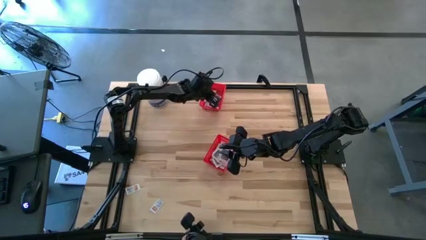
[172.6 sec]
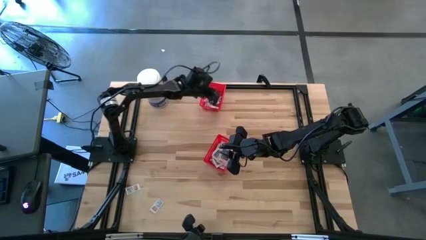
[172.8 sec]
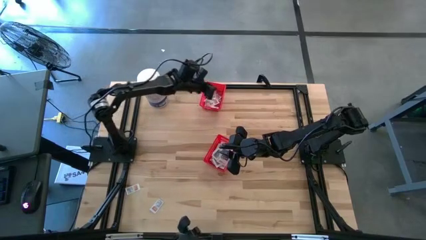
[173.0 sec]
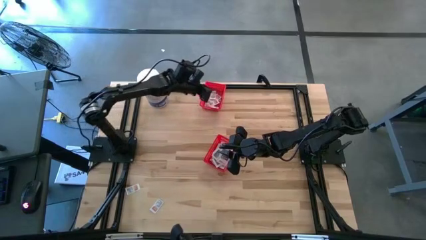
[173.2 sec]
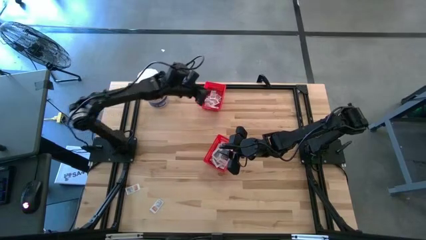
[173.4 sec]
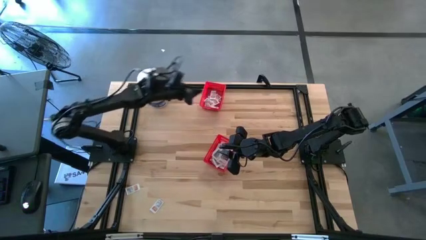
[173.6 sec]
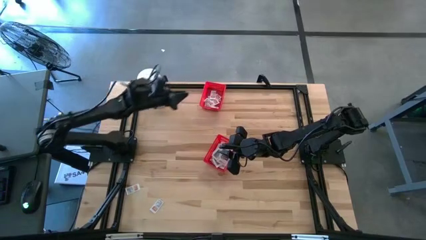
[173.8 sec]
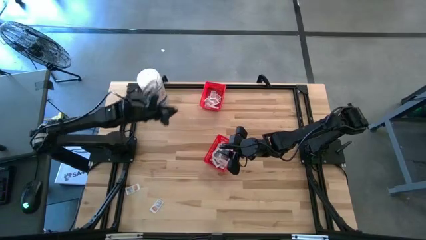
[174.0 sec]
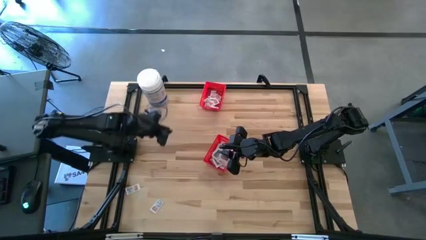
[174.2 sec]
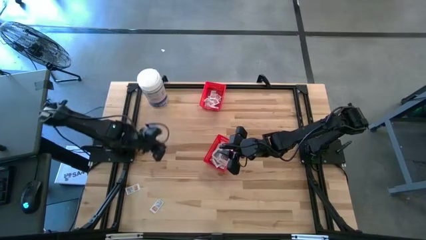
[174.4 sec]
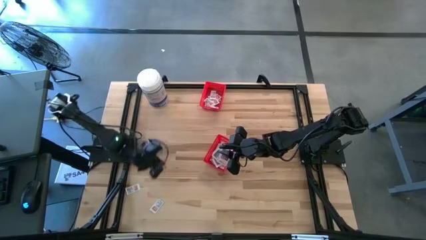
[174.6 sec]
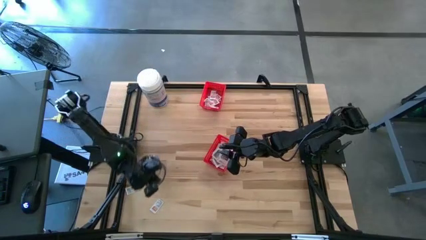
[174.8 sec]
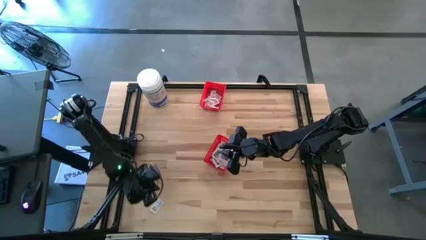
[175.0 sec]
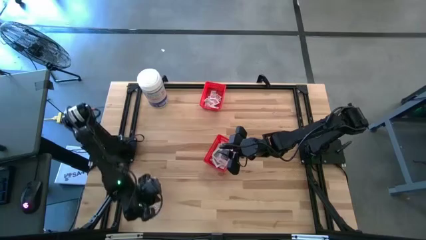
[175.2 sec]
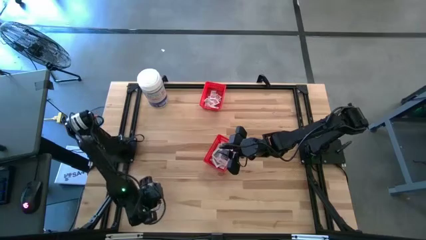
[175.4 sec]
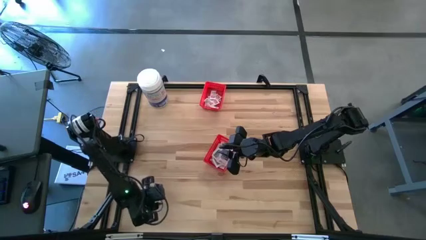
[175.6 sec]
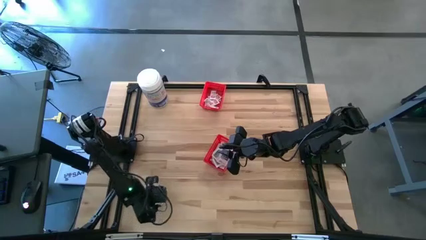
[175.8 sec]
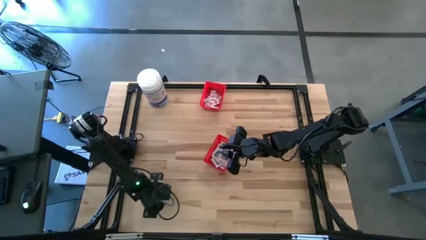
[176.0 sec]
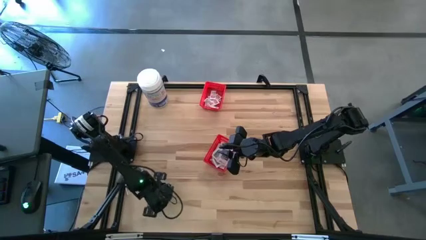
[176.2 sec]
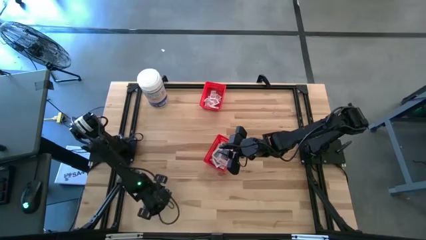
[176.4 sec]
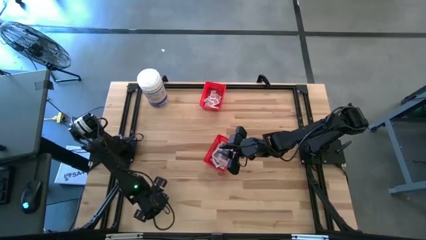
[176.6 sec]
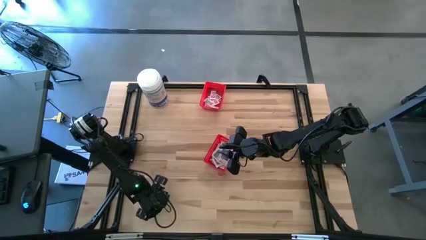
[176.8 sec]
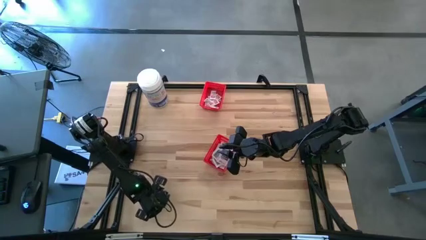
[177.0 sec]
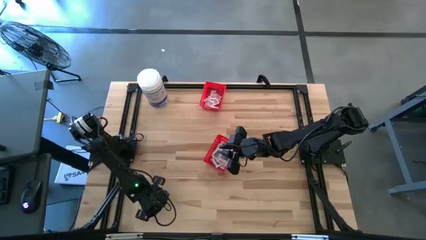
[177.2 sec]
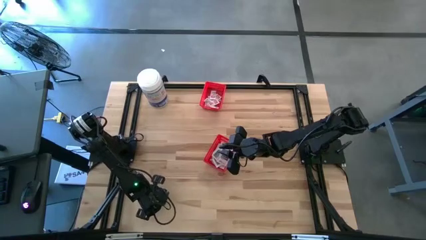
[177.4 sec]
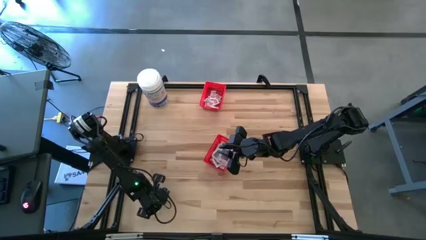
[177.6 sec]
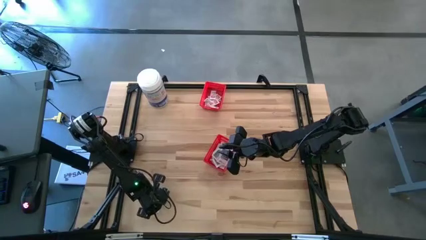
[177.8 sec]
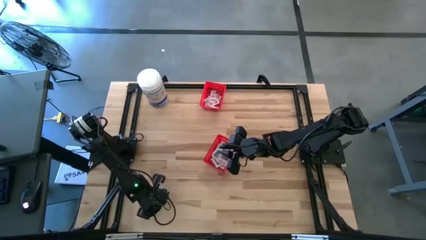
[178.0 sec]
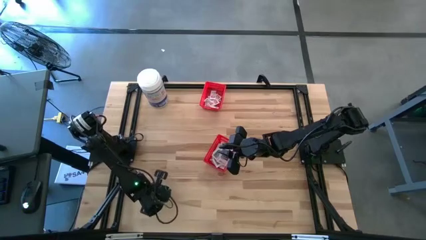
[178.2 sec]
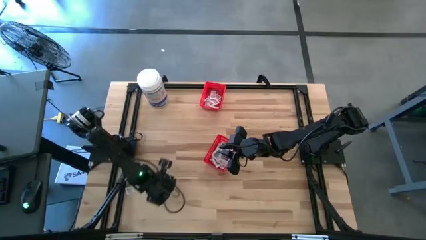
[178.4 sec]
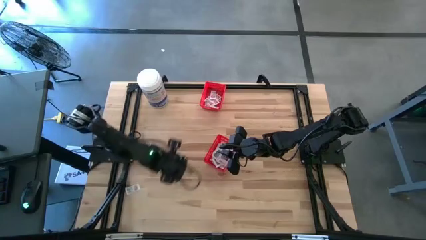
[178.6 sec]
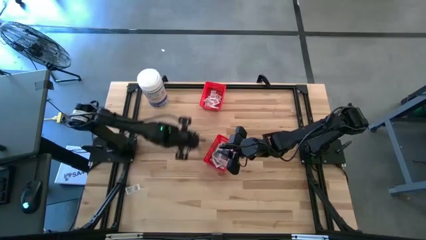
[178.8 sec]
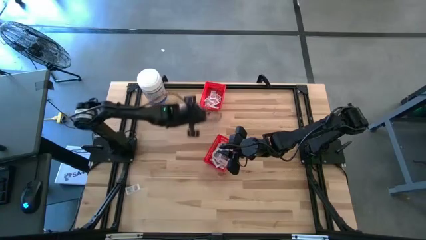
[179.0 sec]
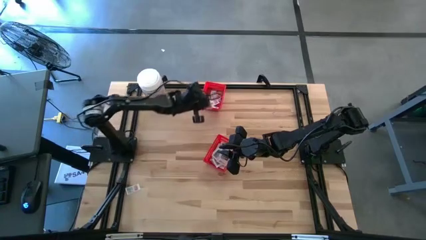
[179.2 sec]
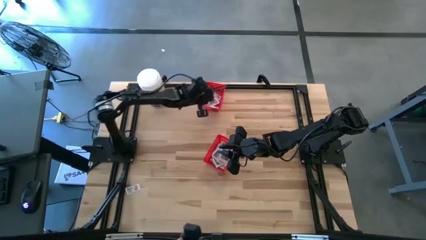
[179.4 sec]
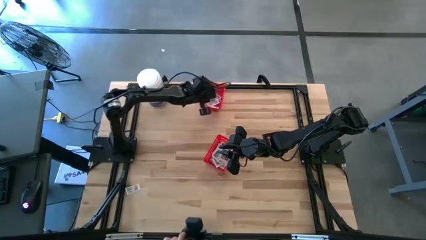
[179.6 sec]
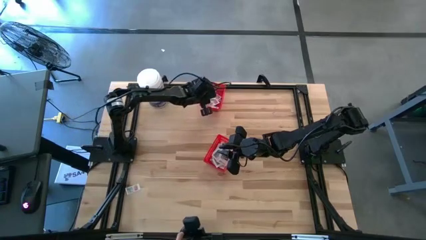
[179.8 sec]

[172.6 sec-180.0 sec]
Task: Pick & Place First Aid Supplies
Put the white ointment pack into the top red bin

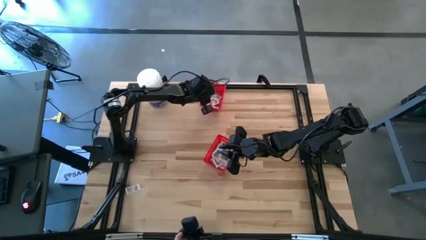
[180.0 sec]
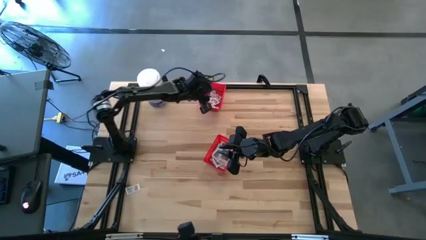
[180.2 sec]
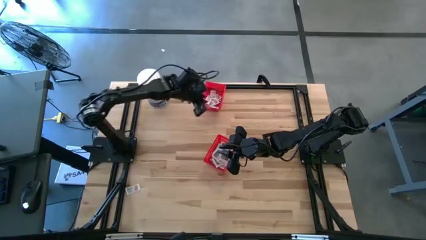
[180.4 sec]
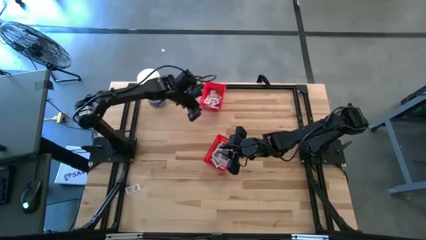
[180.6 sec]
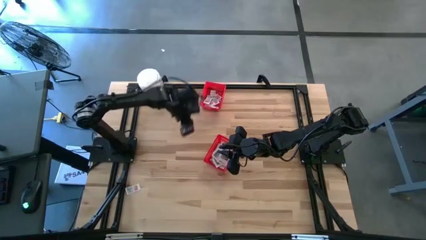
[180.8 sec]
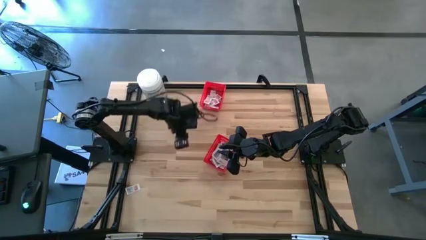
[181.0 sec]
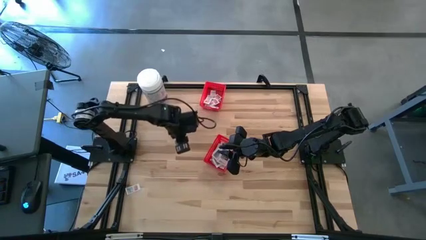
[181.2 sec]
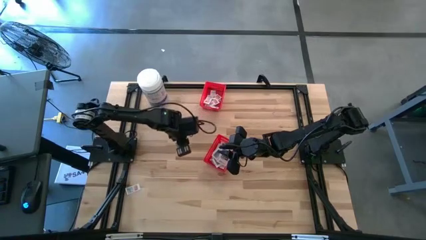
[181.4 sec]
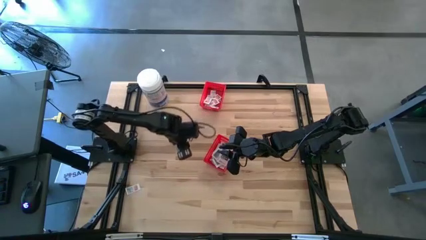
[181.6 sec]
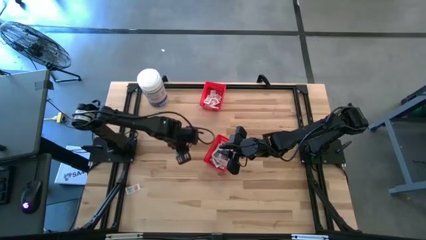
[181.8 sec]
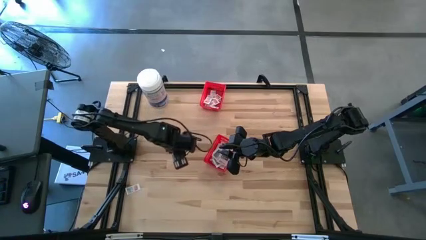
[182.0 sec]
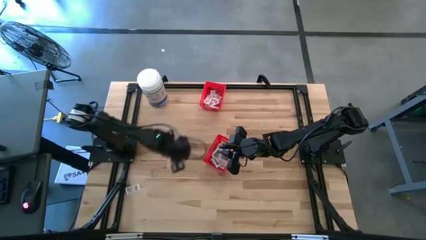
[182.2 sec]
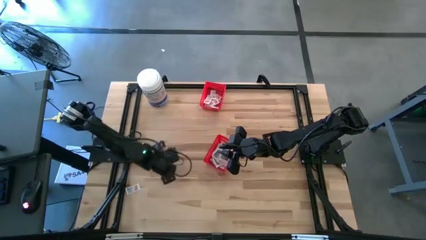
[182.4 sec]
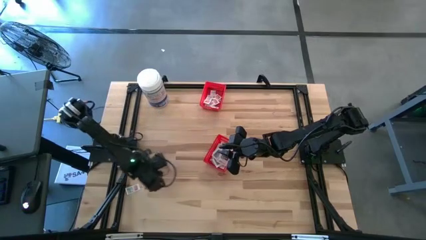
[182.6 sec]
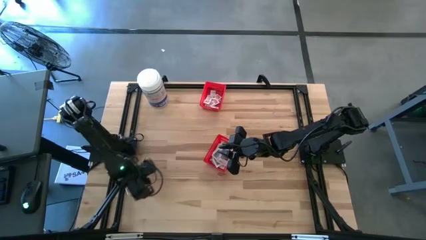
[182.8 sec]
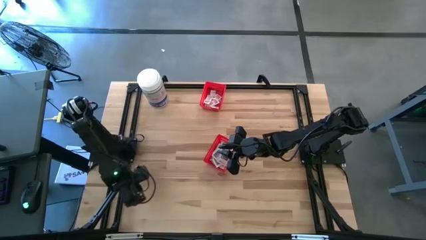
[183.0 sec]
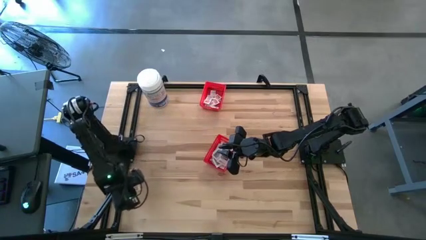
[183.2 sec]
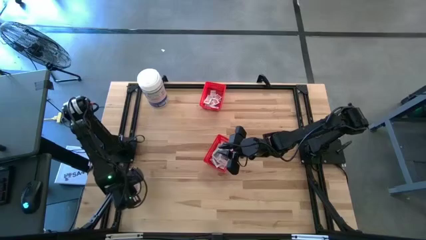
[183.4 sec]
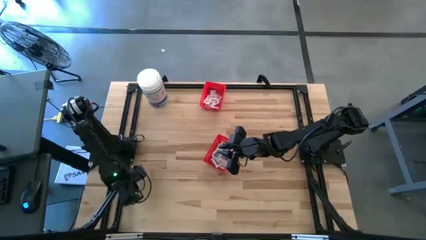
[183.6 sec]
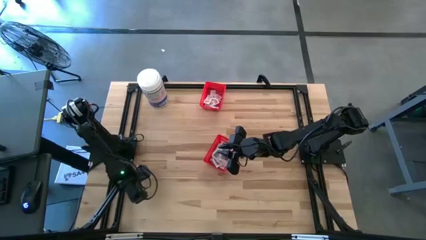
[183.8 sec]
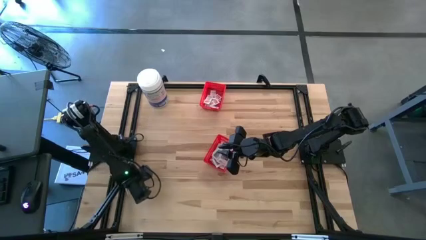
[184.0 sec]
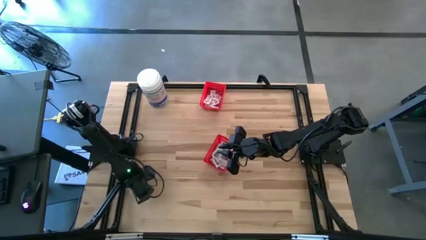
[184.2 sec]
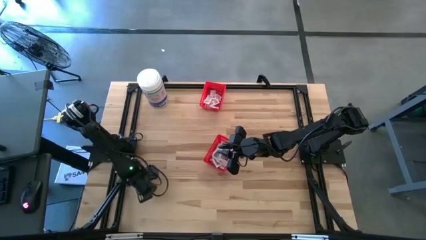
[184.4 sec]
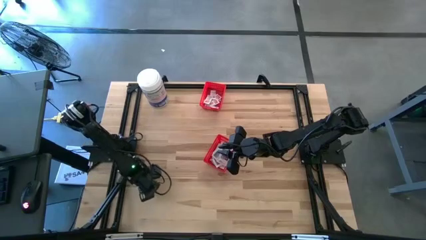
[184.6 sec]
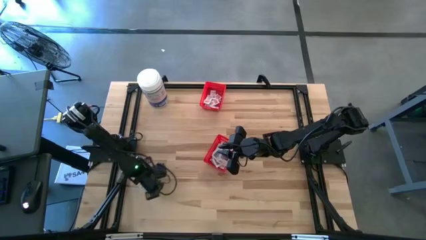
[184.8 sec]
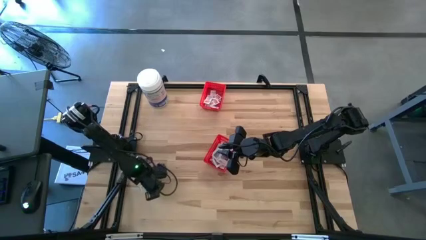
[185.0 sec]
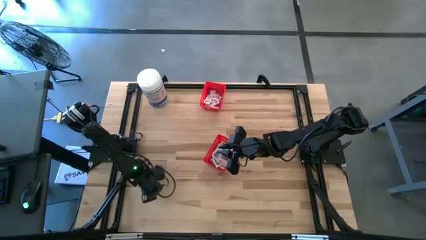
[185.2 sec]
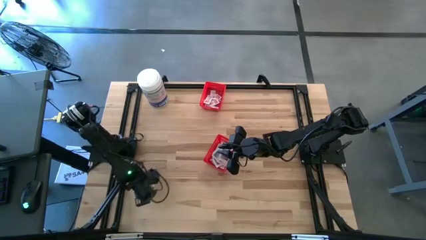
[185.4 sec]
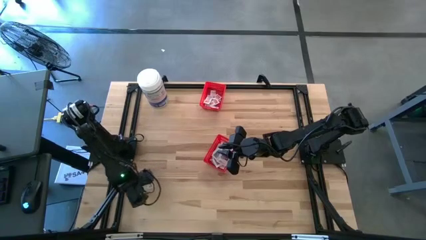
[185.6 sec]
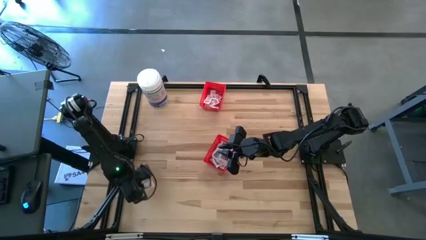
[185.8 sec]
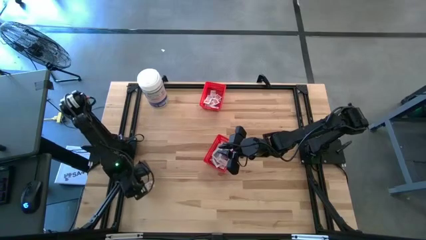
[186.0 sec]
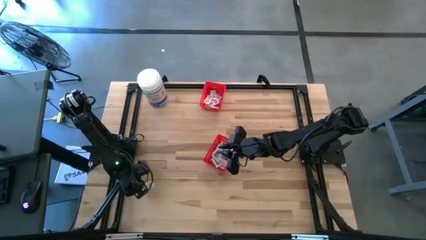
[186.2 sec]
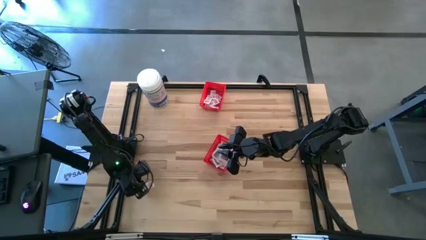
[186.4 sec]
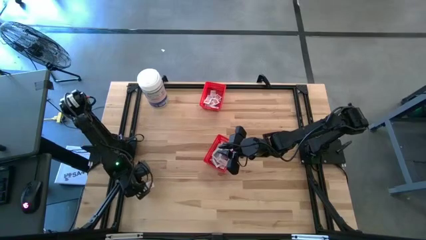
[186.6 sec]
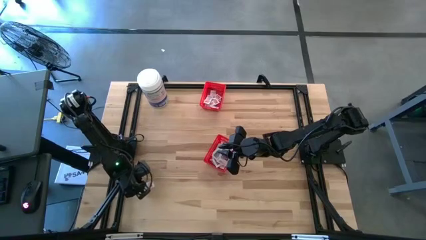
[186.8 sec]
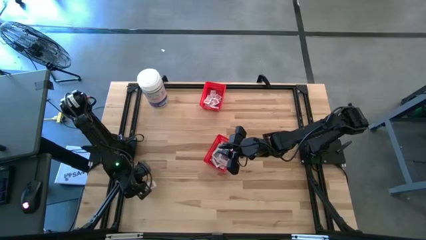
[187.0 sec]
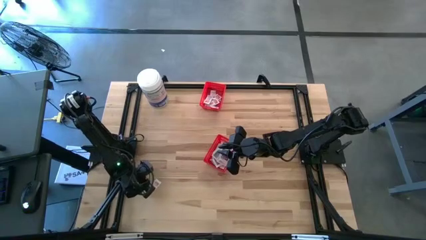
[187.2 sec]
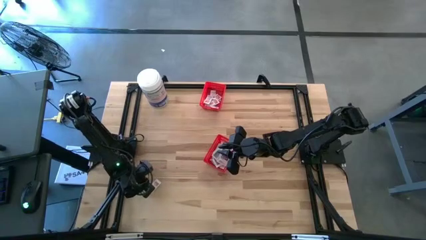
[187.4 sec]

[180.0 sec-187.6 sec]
Put the white ointment pack into the top red bin
